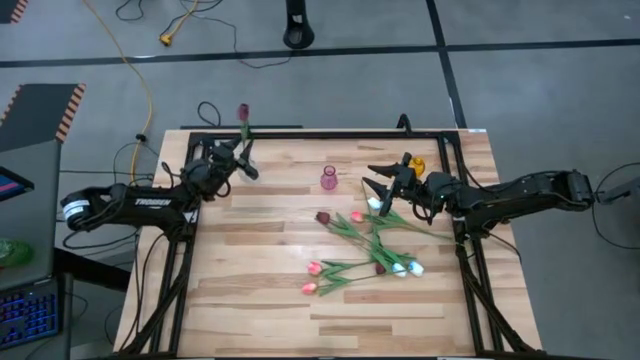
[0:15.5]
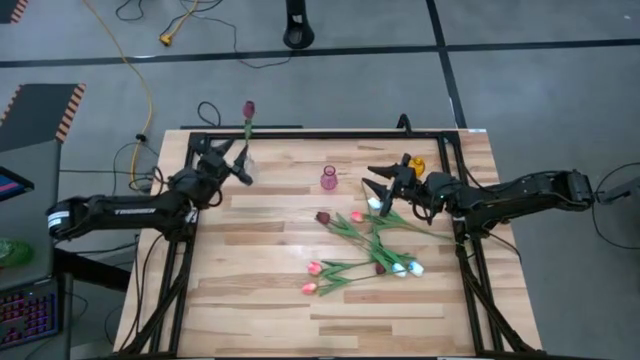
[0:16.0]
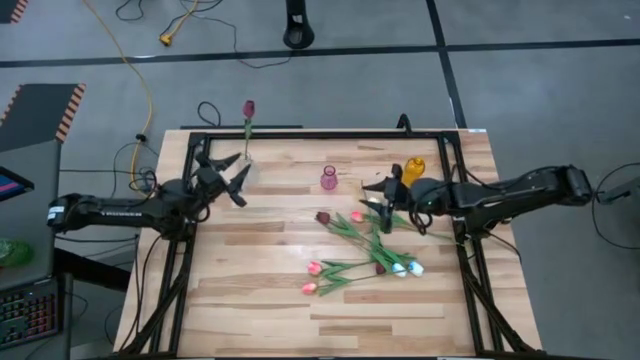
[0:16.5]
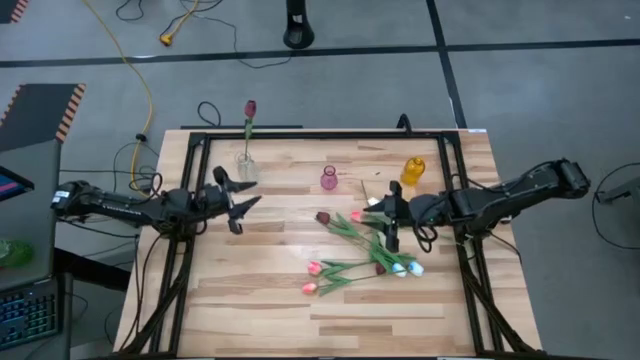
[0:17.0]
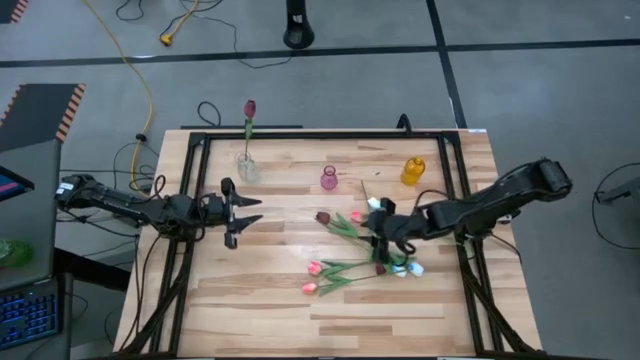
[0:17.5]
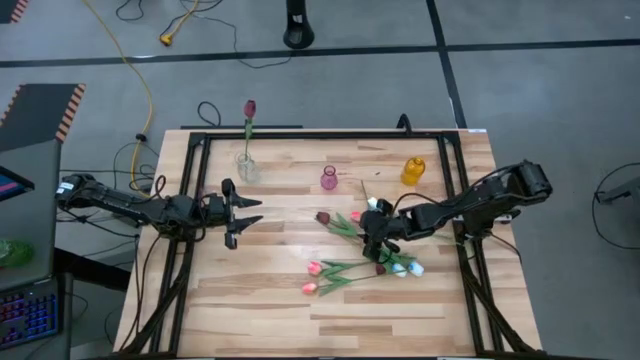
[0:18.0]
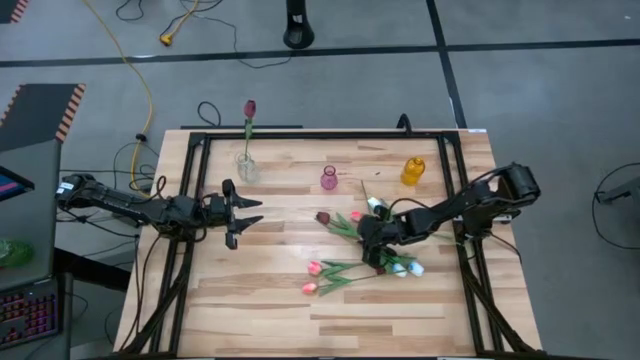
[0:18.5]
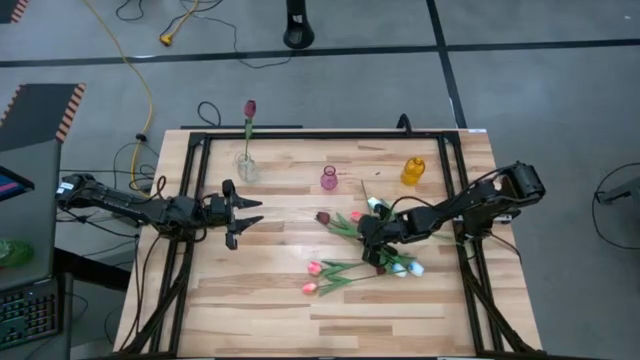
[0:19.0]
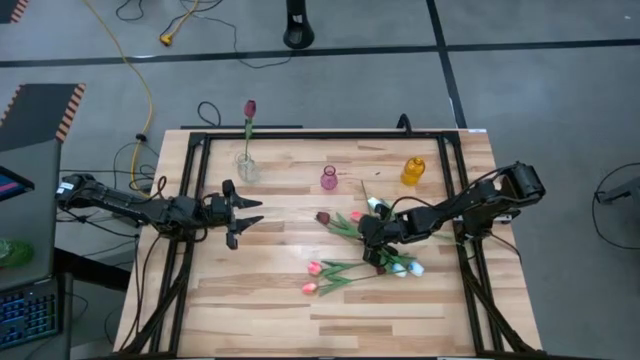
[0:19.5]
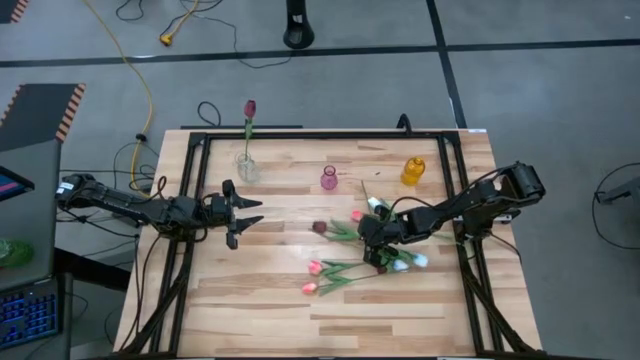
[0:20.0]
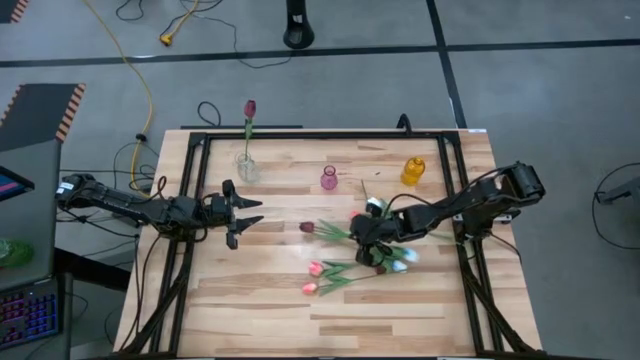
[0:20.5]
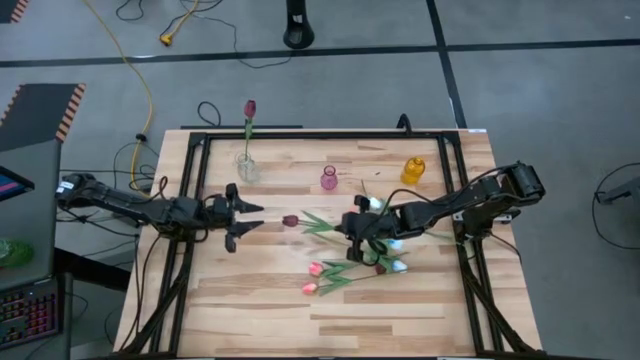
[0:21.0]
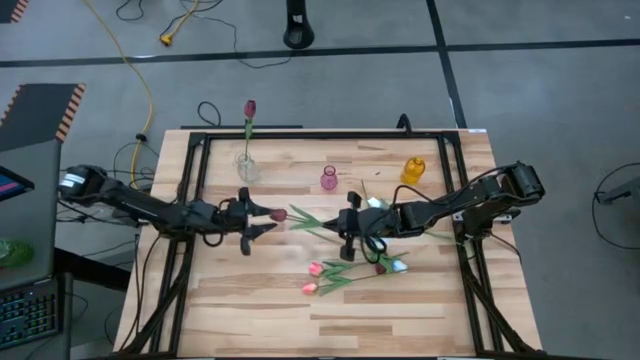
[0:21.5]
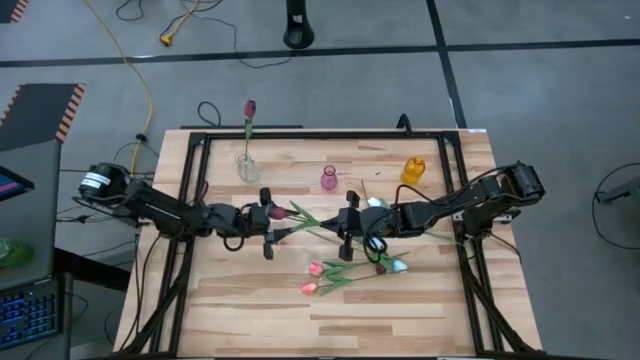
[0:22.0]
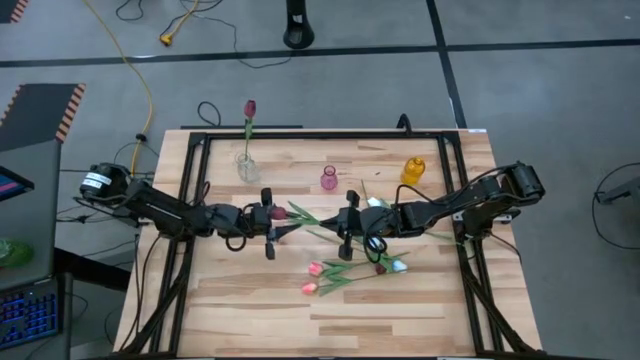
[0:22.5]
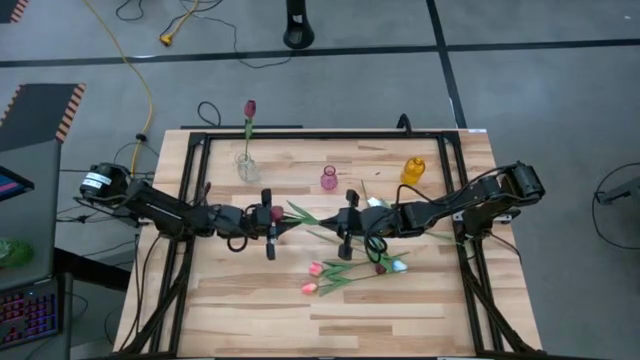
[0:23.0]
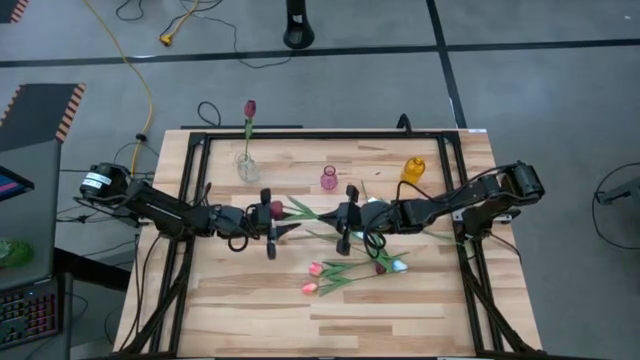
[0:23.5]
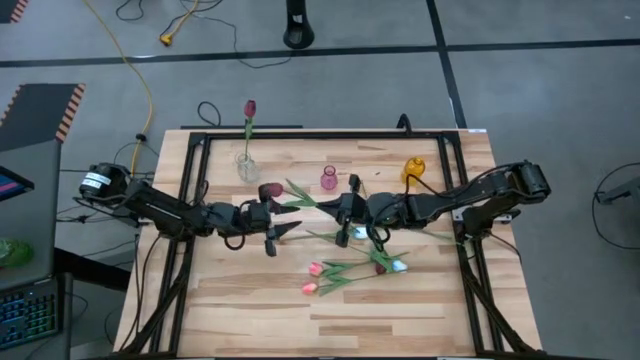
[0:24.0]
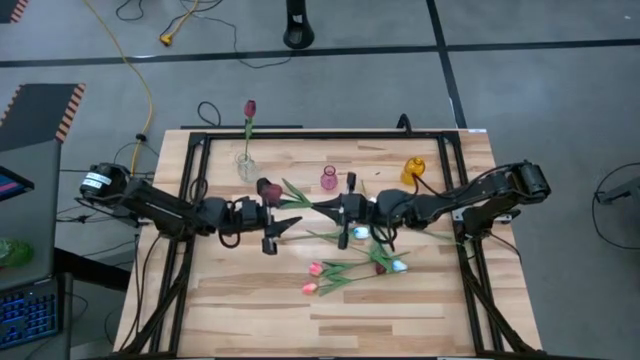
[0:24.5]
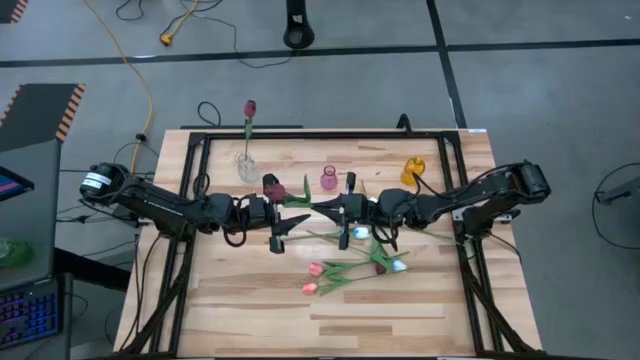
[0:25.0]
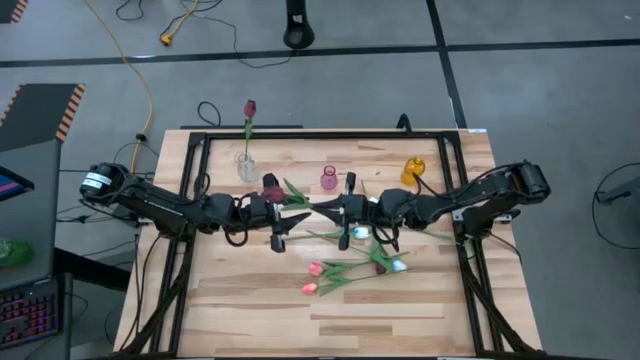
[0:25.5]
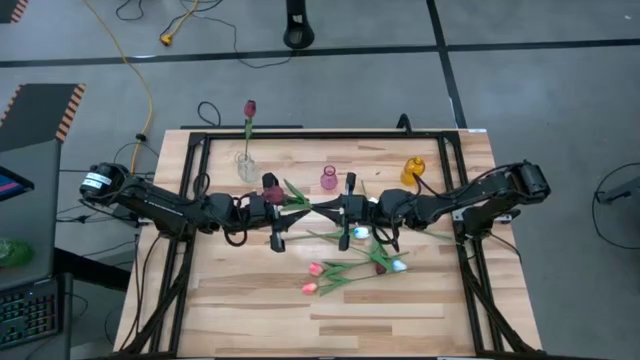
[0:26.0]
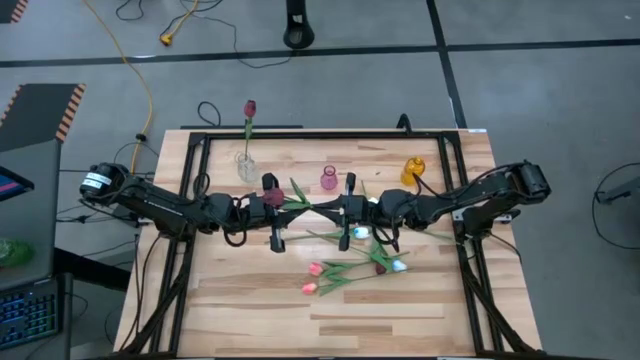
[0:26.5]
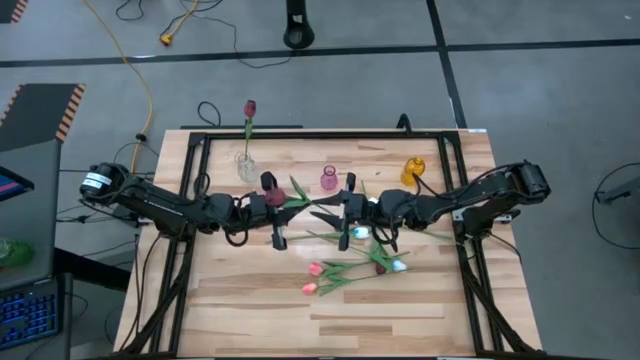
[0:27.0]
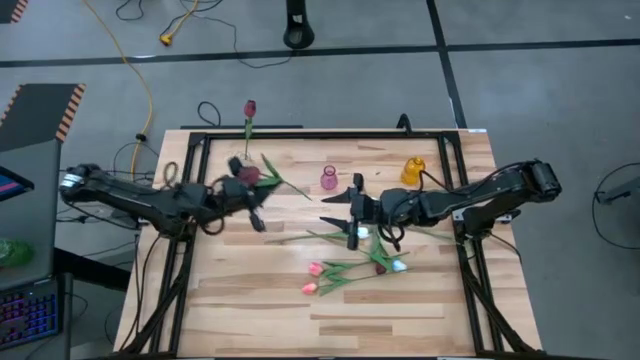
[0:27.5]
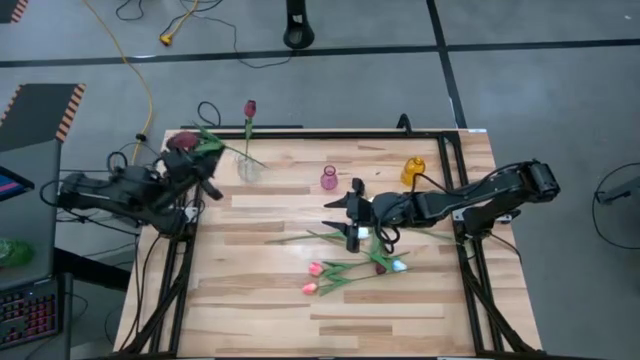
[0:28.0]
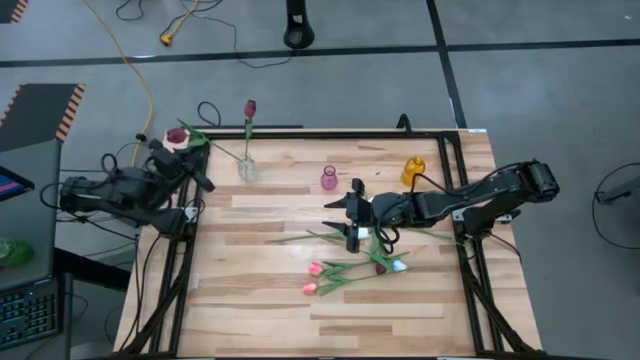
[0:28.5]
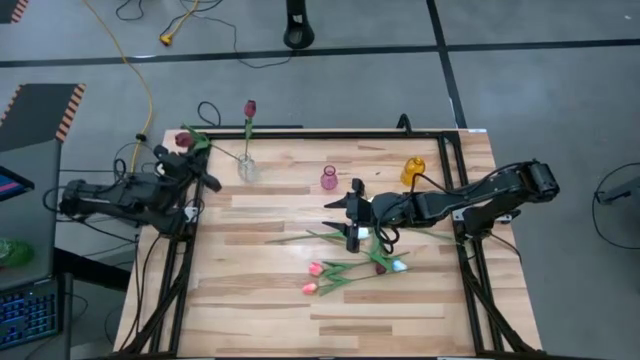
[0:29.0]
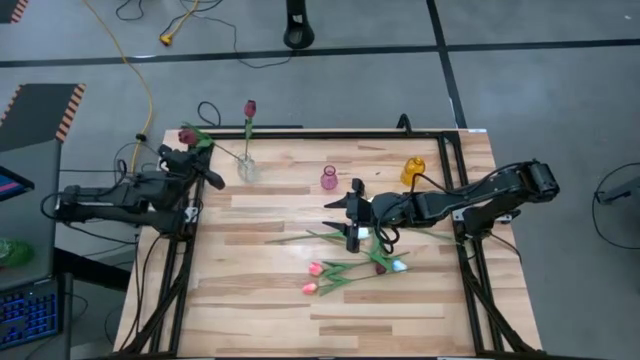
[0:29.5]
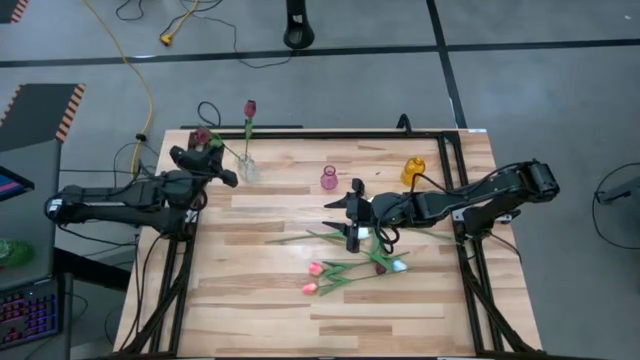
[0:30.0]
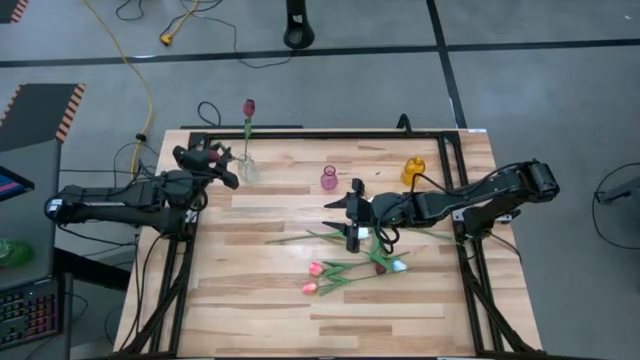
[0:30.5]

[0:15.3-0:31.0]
Task: Sort flowers into vase by color
Put the top red flower into the transparent vase
